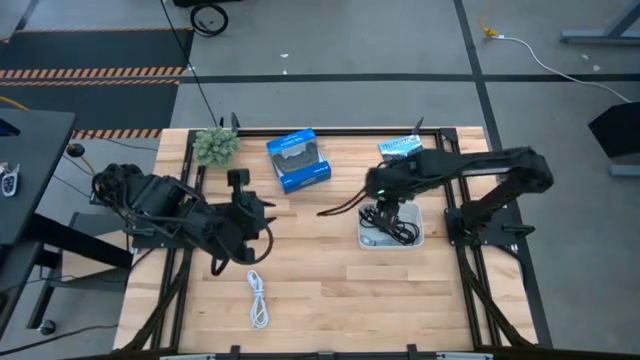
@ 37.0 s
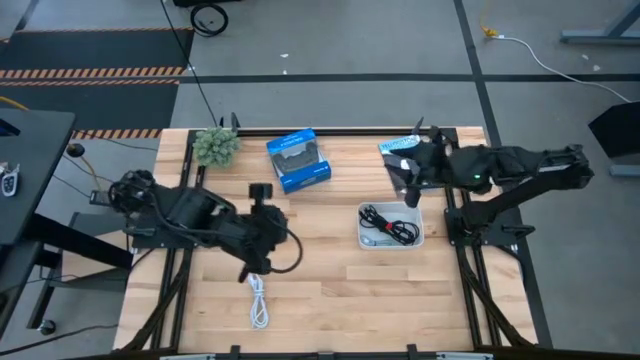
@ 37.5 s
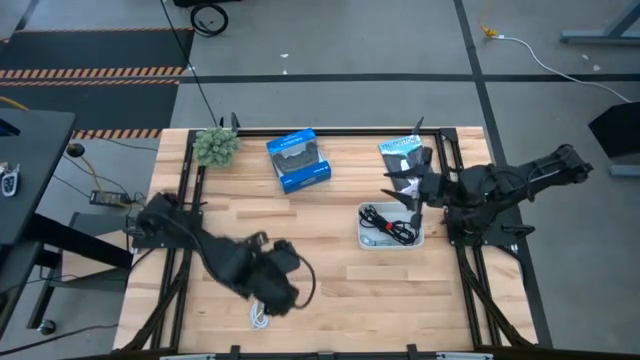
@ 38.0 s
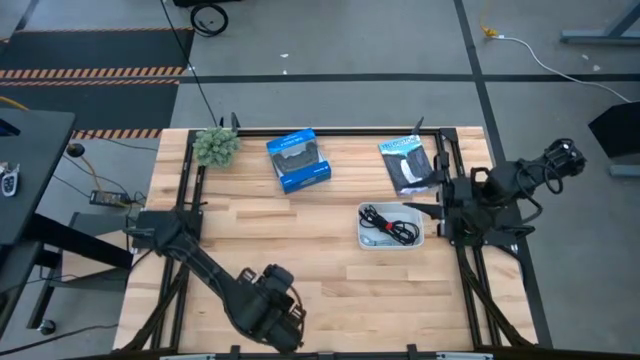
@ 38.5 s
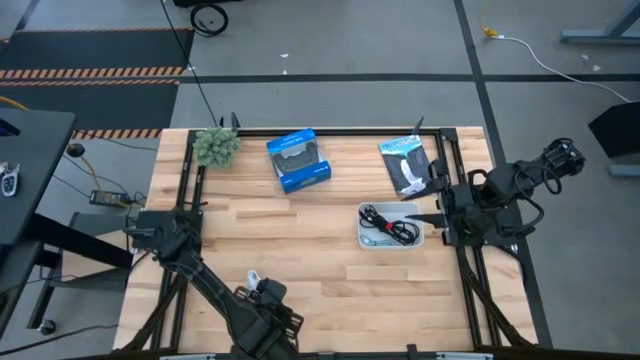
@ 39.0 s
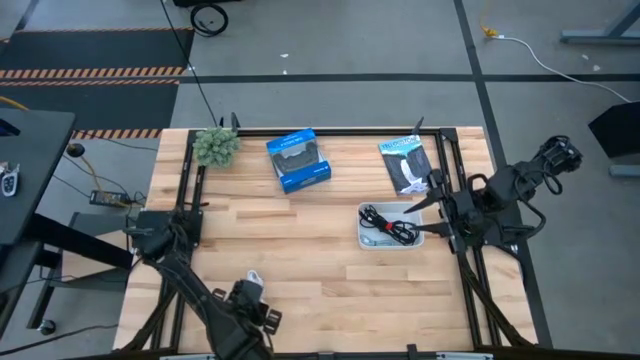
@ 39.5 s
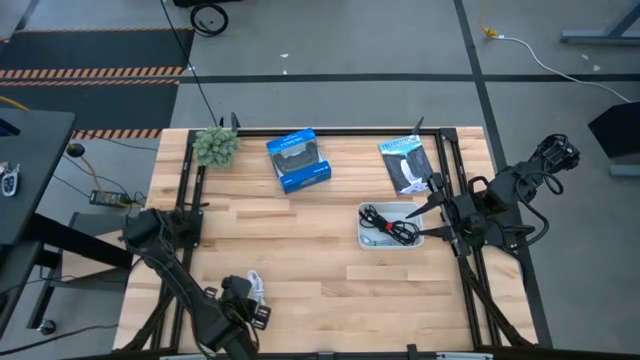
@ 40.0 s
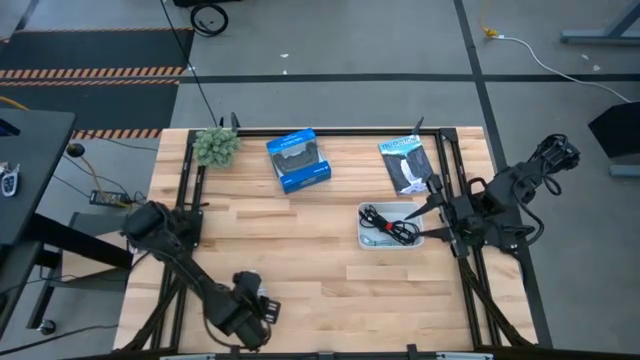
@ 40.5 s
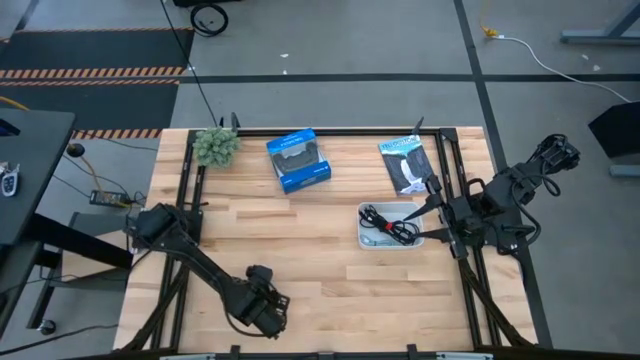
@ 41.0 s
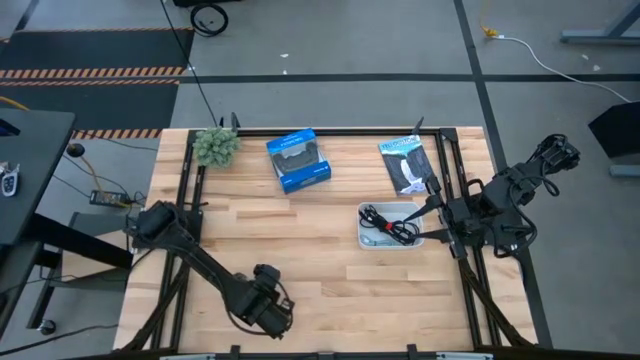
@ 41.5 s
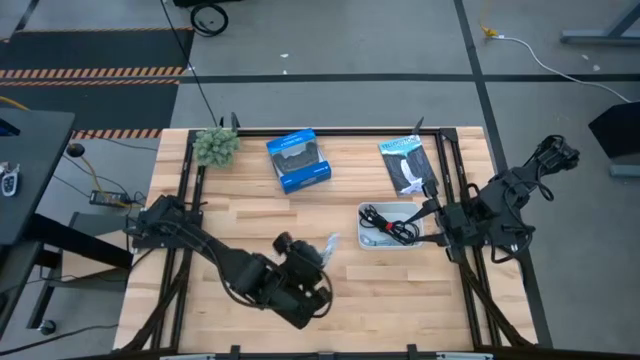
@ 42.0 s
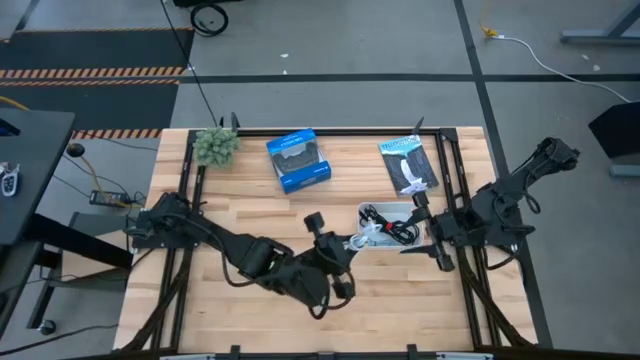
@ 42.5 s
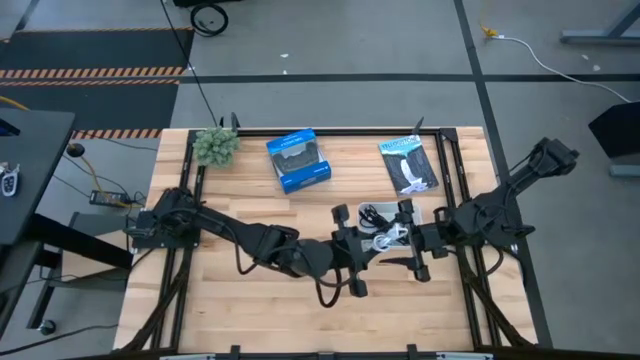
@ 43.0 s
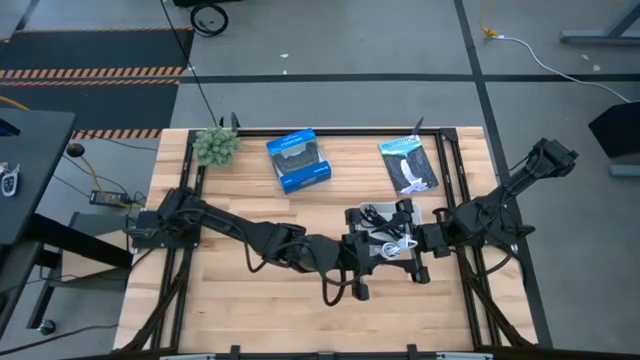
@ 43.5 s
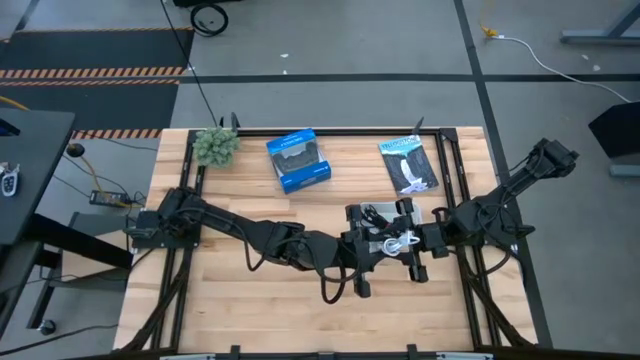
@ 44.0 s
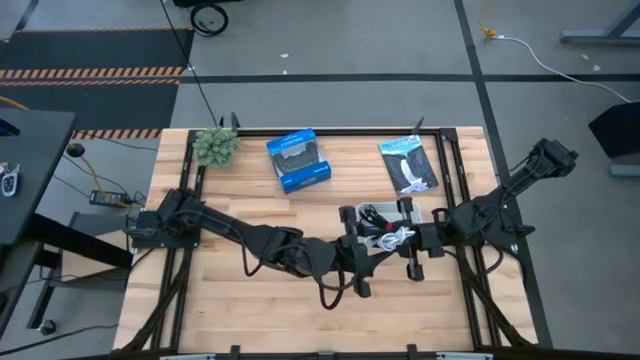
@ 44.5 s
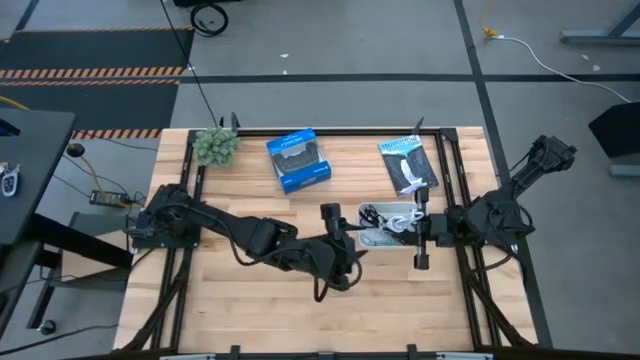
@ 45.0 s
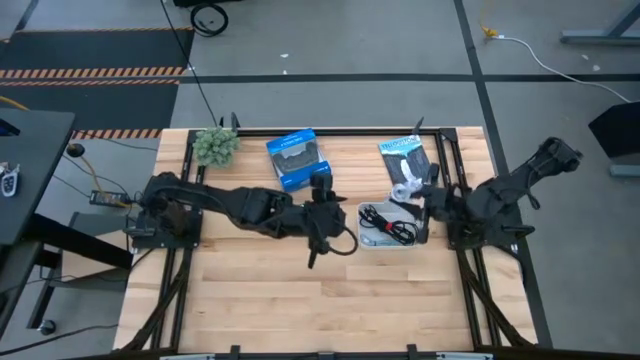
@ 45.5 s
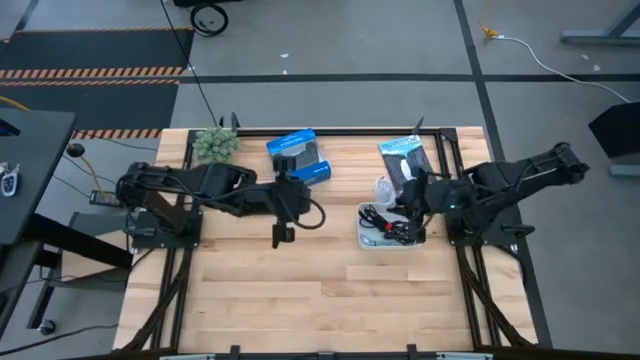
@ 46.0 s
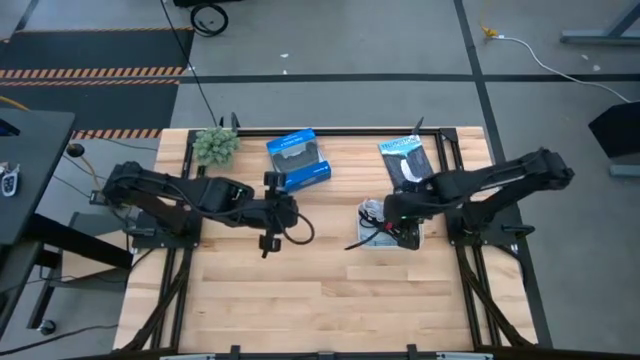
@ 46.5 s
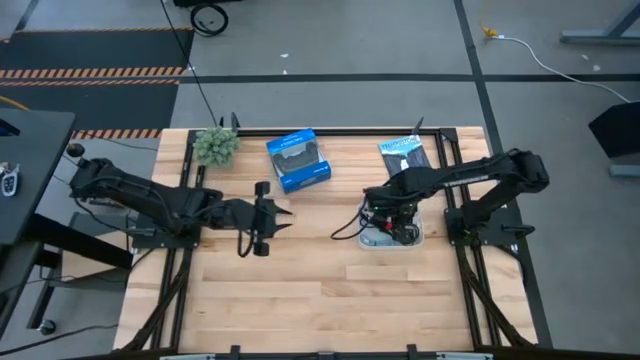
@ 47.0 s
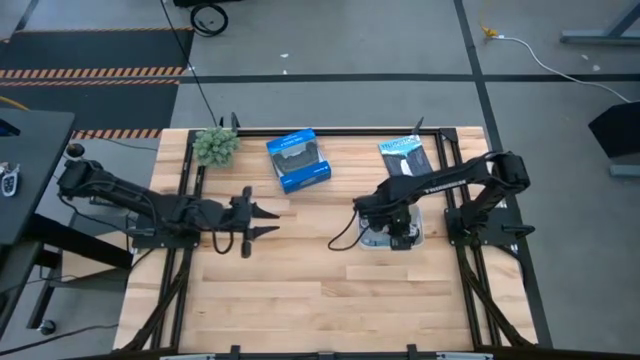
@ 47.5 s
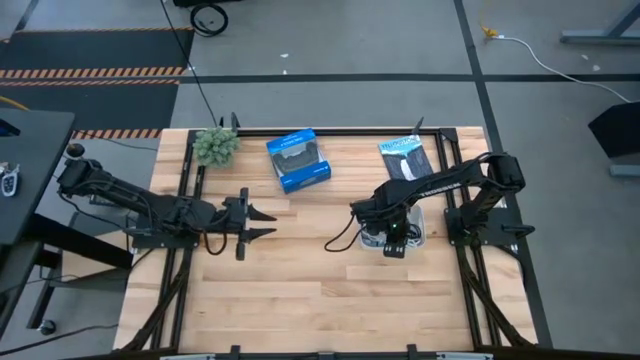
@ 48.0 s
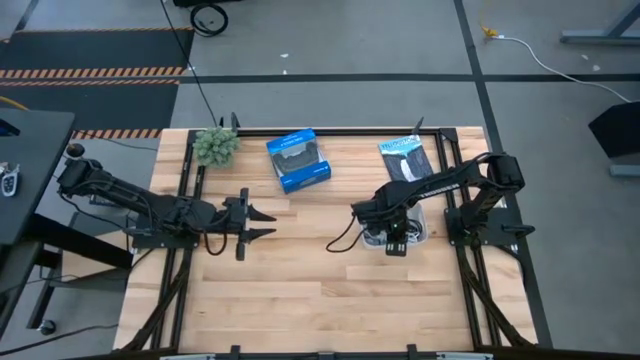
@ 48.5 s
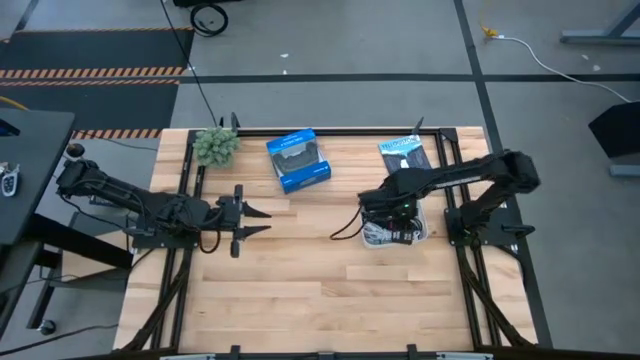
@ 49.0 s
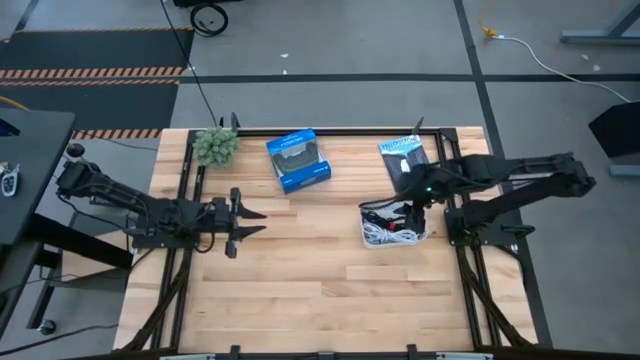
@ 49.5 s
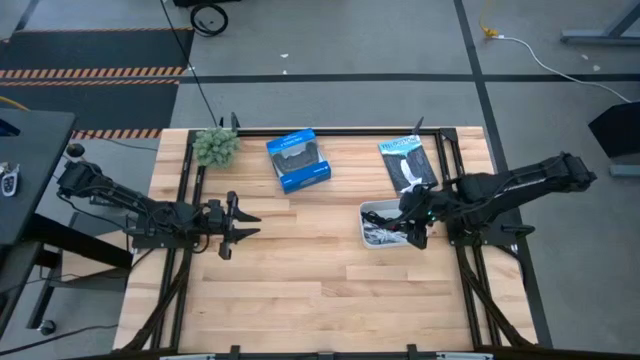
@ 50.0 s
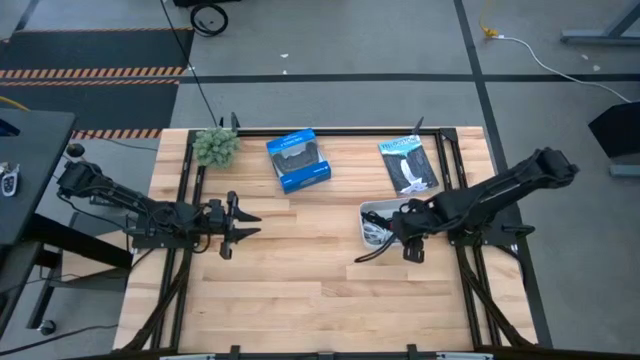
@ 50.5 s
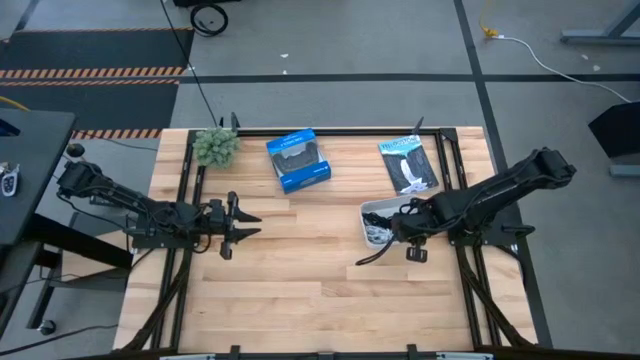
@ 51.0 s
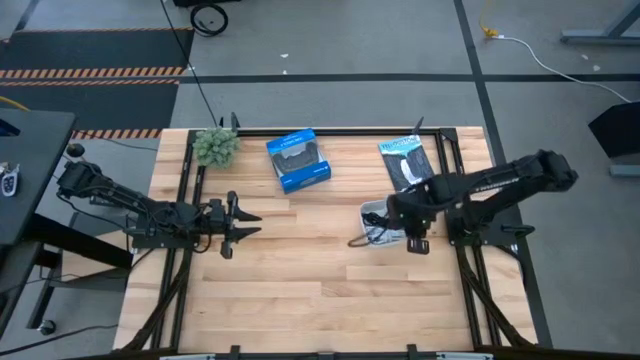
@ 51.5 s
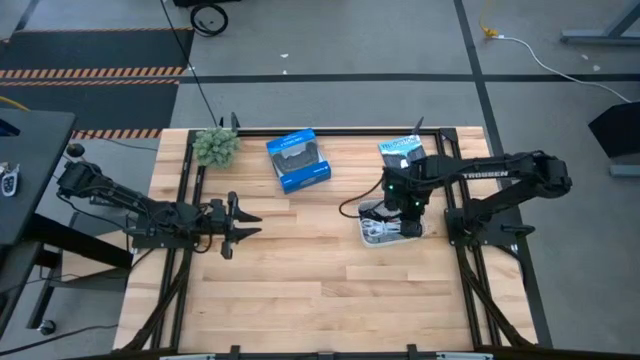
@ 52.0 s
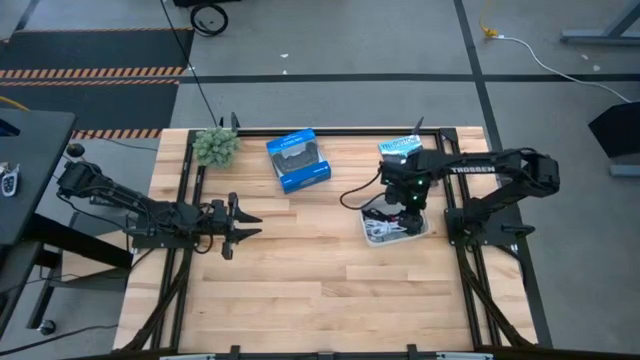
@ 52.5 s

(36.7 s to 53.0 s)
Task: Pick and place USB-C Cables
Put the white USB cable into the white bin

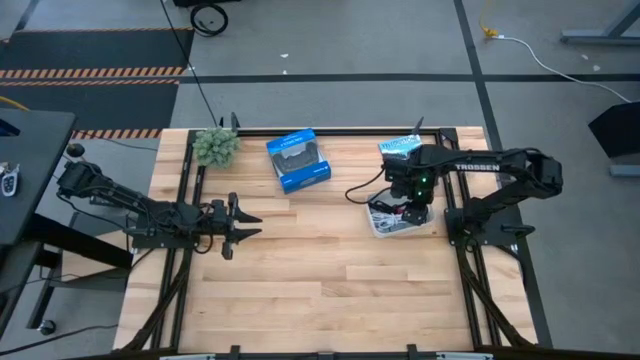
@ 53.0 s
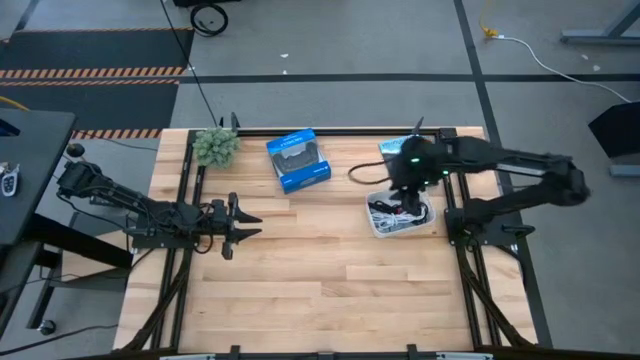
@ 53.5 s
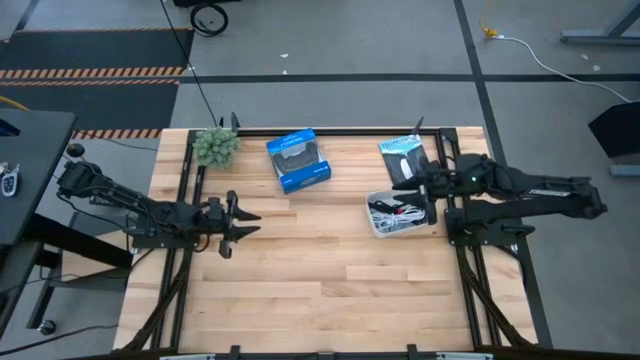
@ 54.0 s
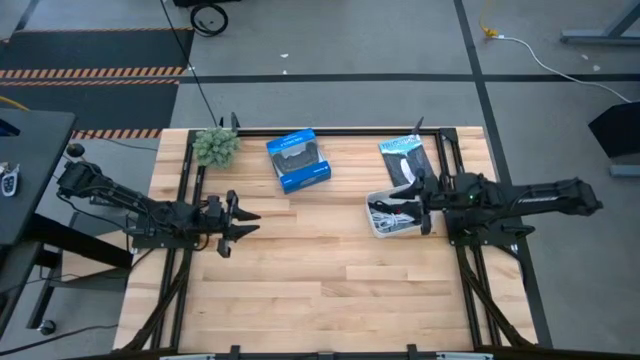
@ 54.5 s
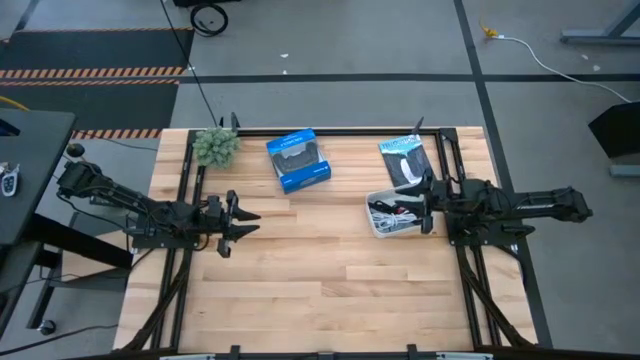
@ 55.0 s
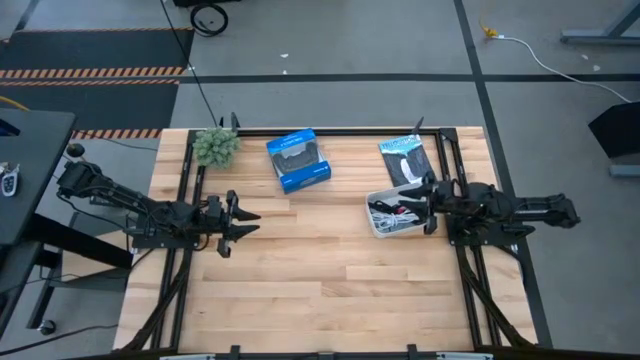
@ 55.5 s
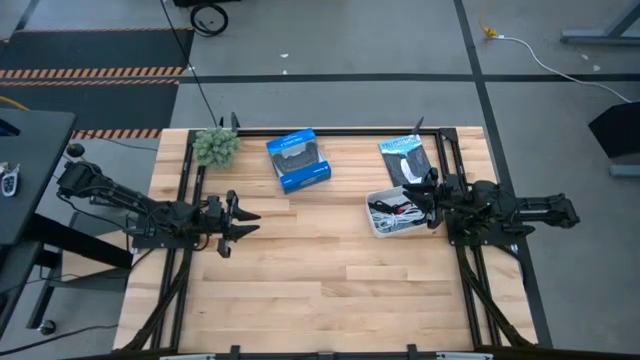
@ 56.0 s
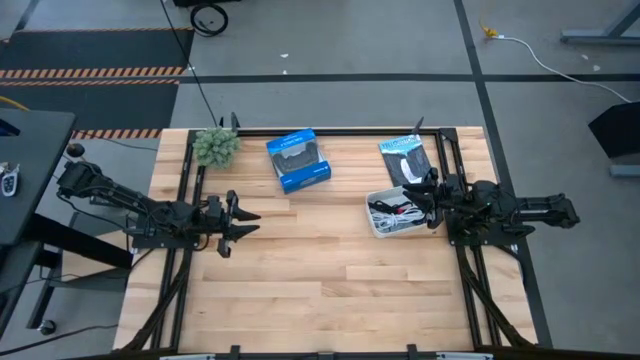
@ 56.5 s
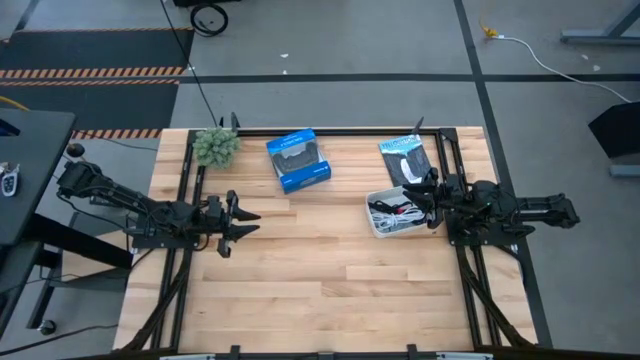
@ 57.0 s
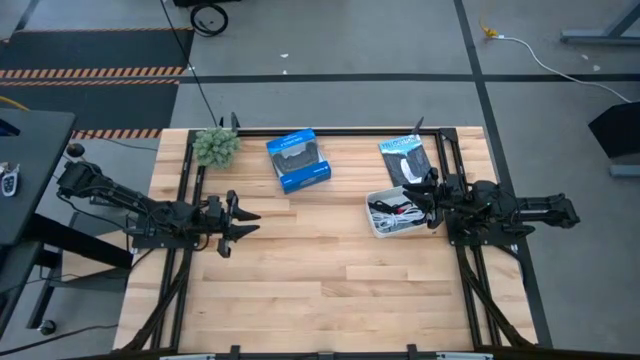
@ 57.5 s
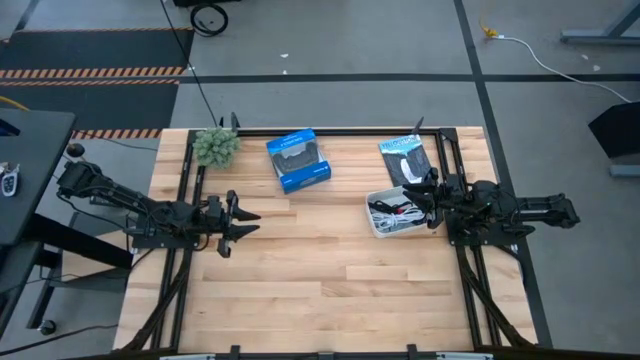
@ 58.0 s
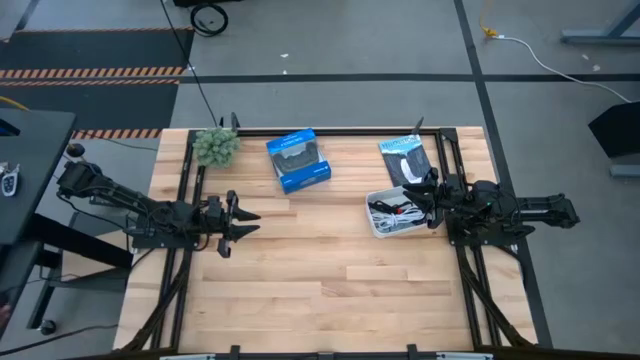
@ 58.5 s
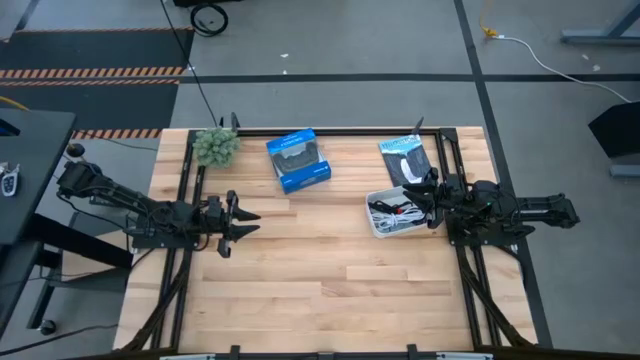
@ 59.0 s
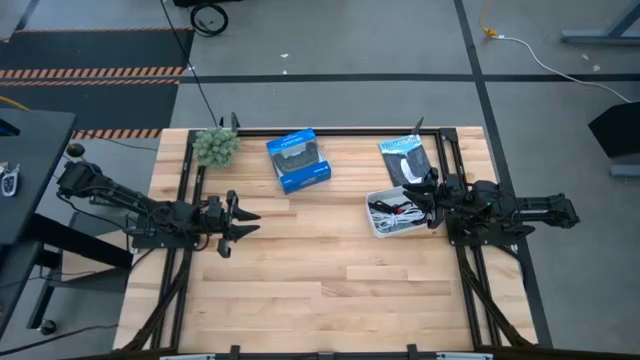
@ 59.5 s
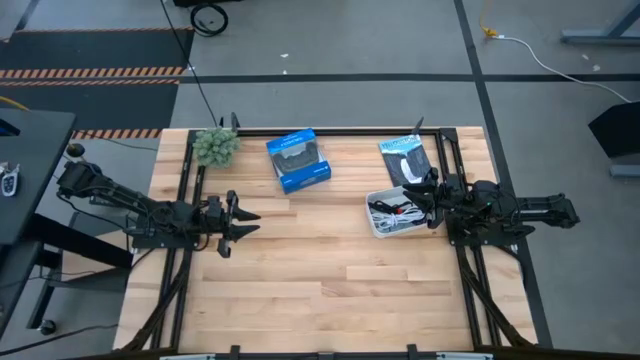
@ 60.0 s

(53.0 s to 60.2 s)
Return to Home Position
